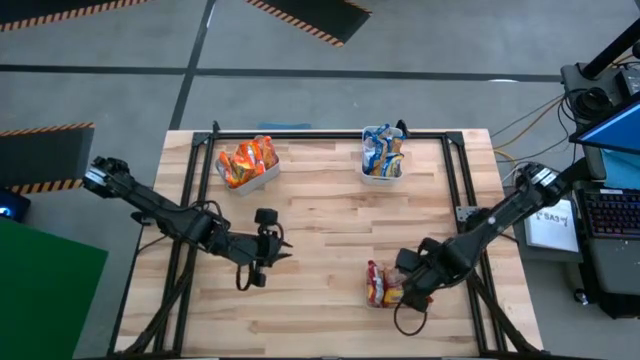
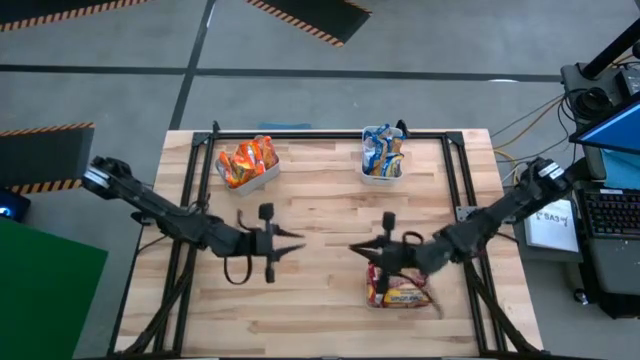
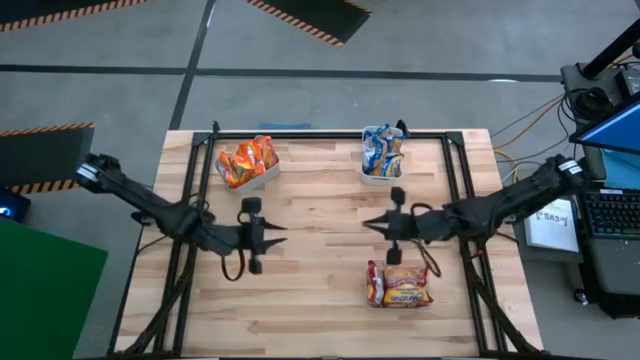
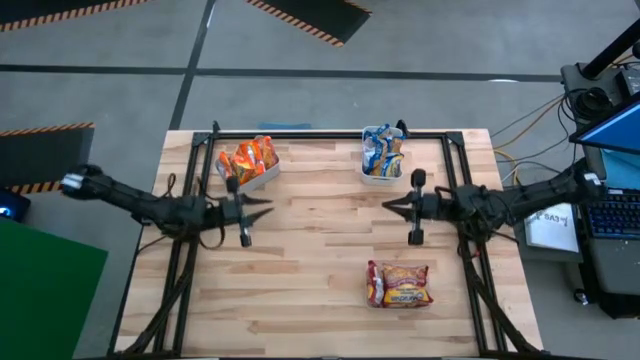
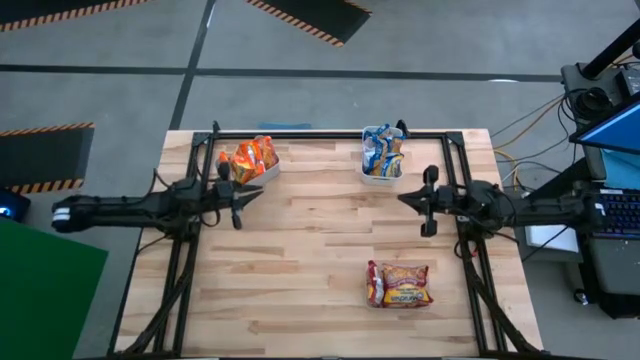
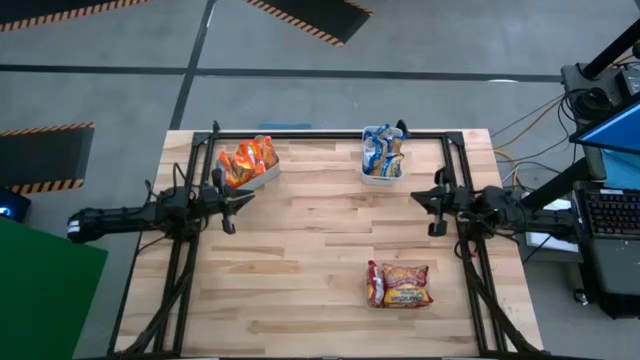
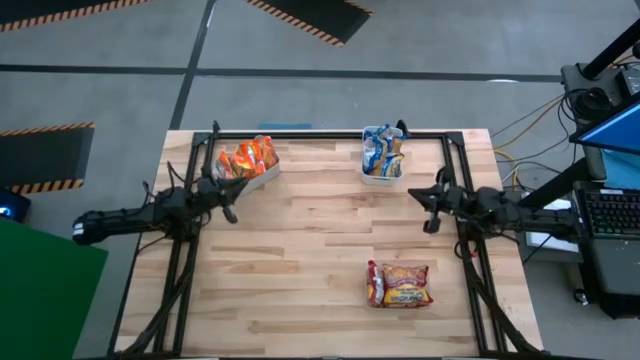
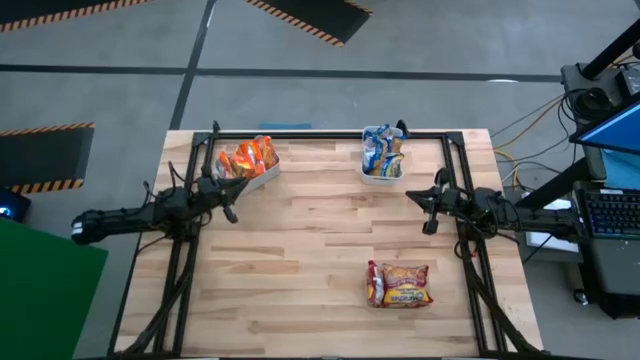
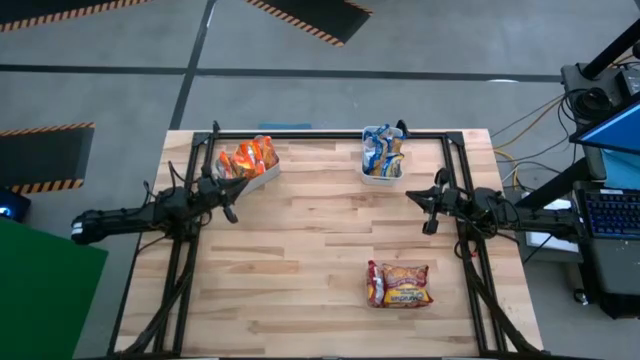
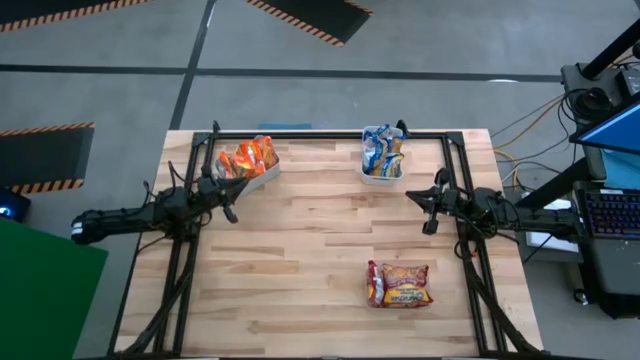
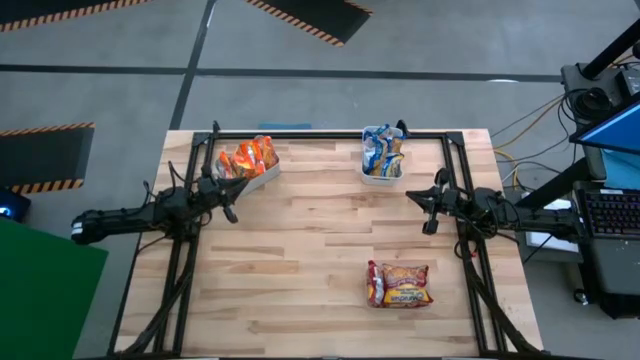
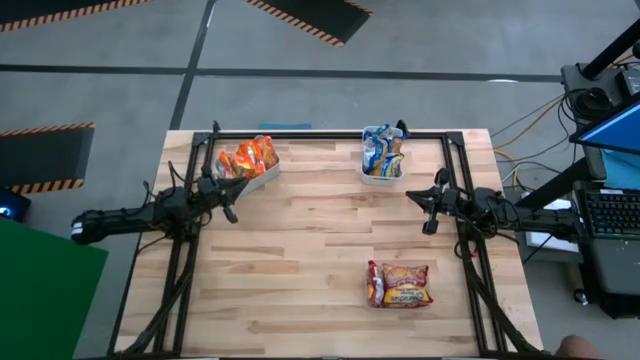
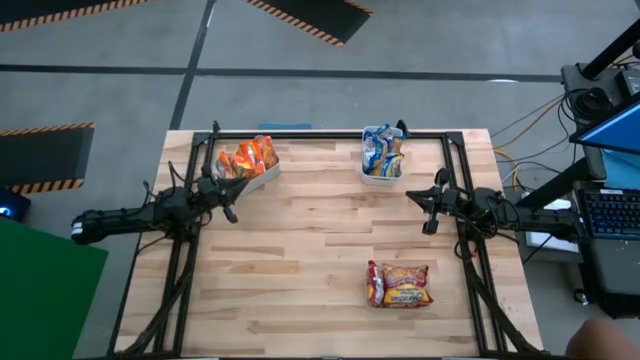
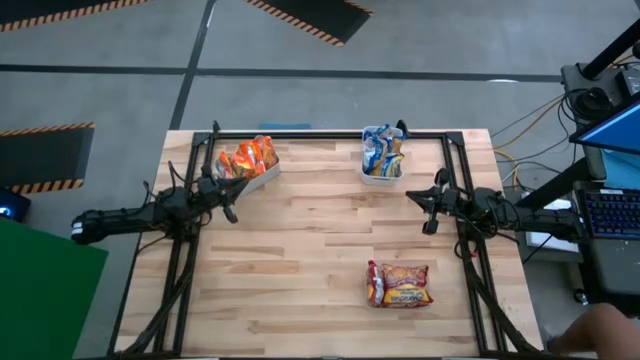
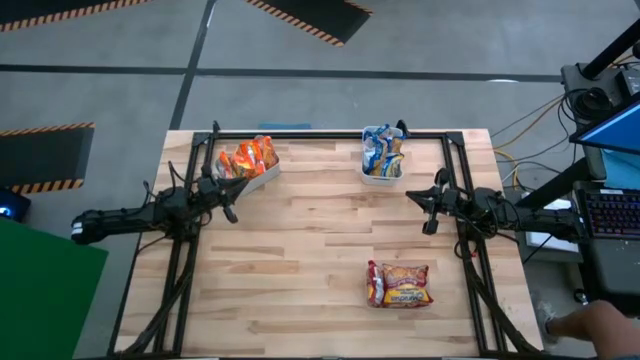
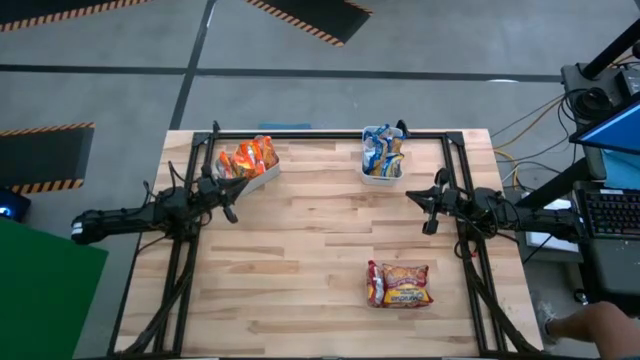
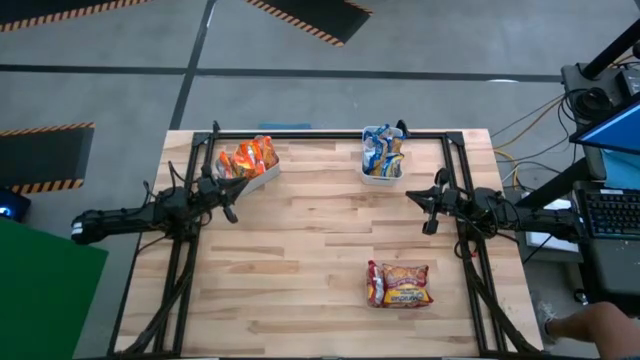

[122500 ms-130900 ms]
Task: Sort Maruchan noodles
Return to Home Position

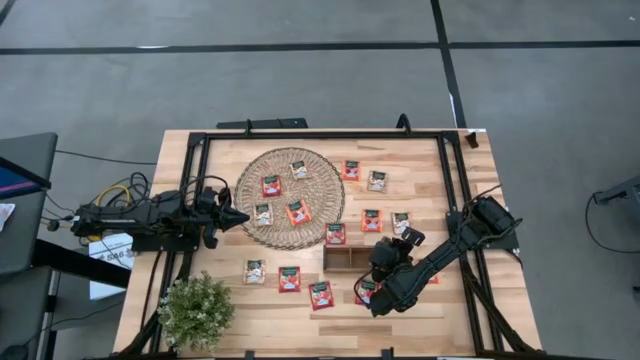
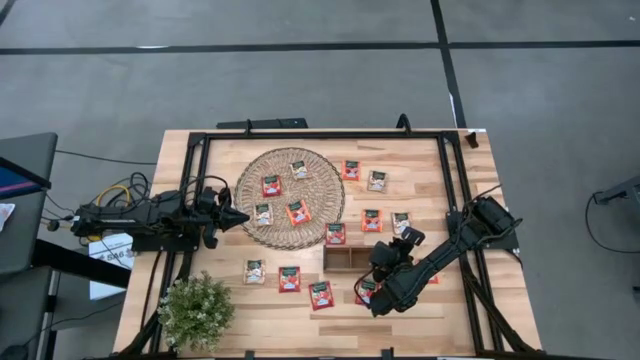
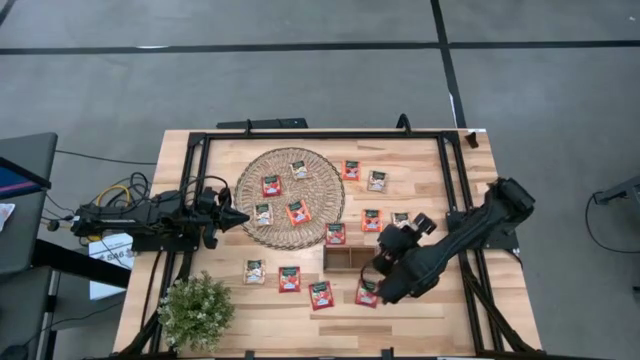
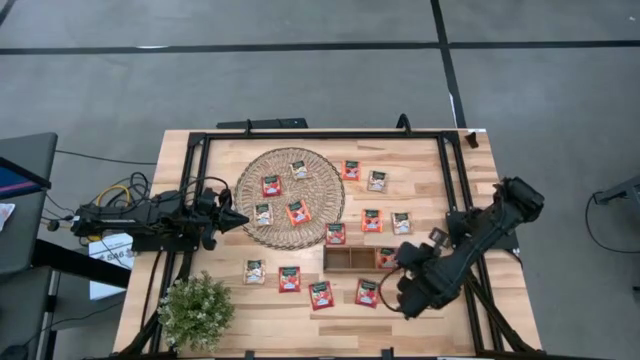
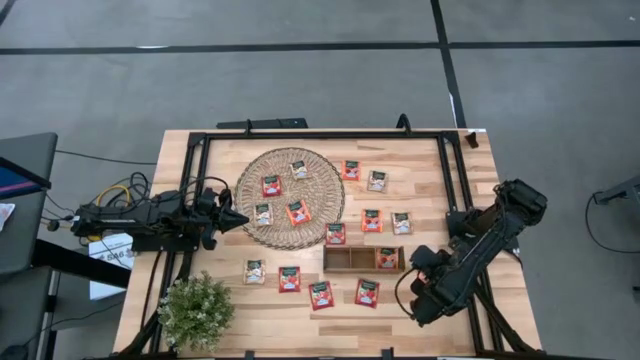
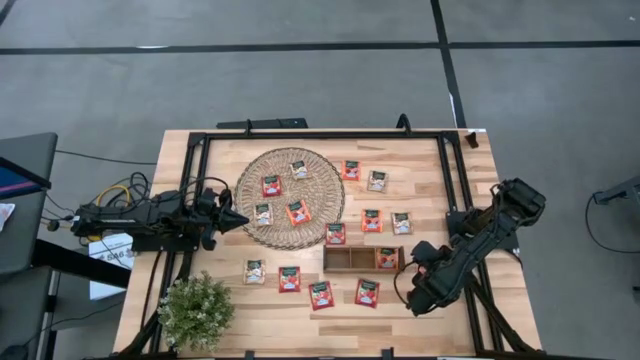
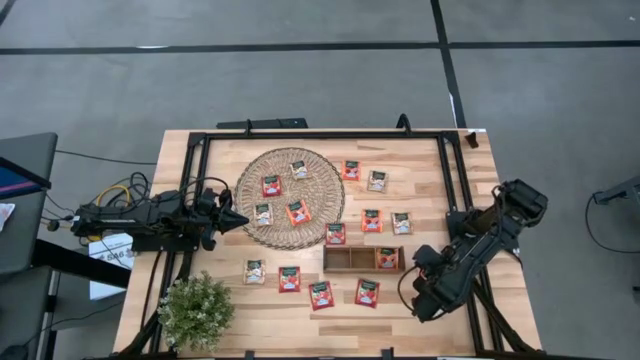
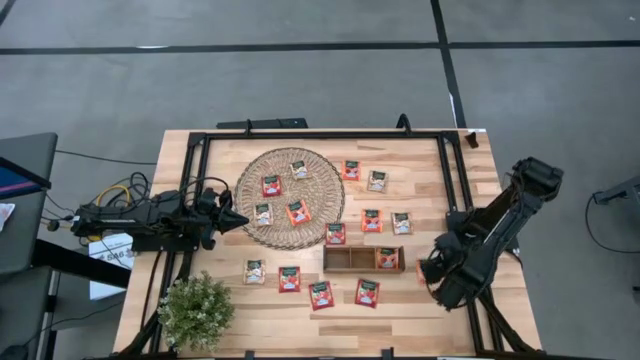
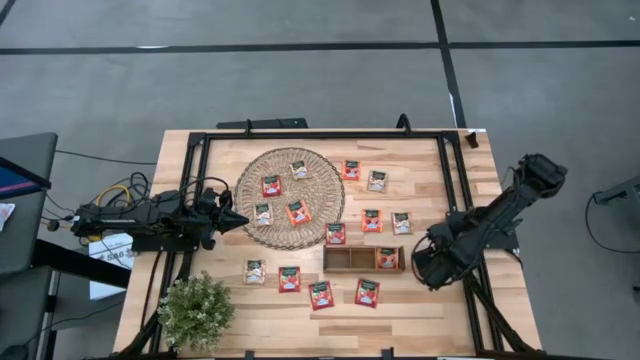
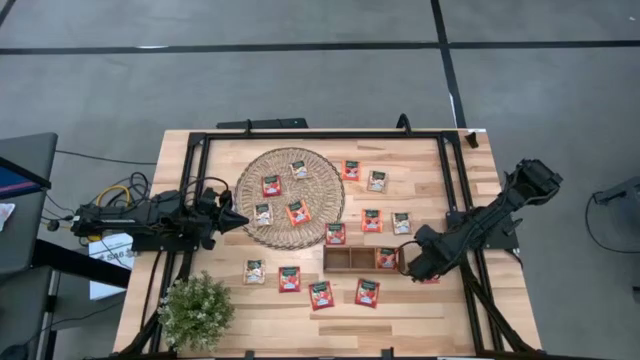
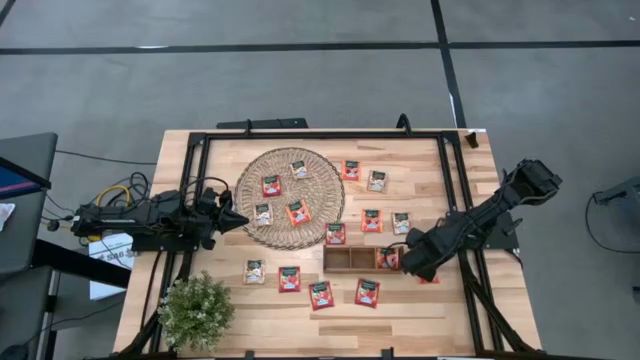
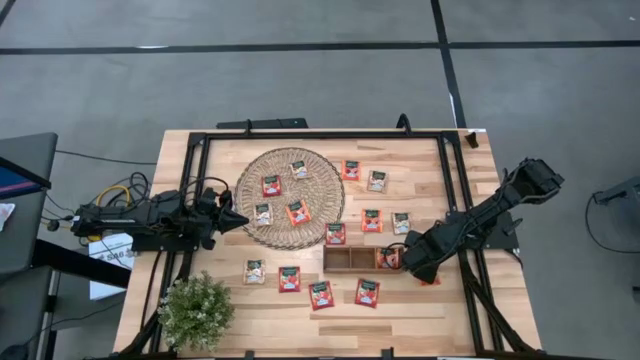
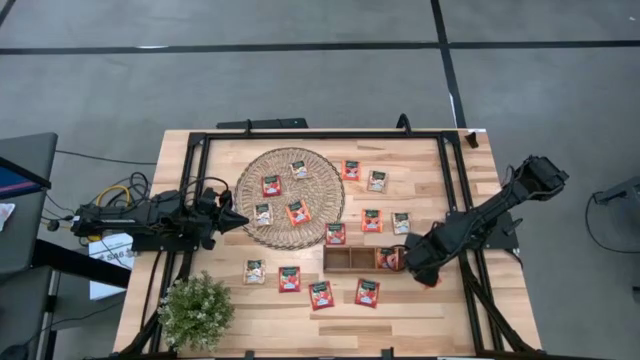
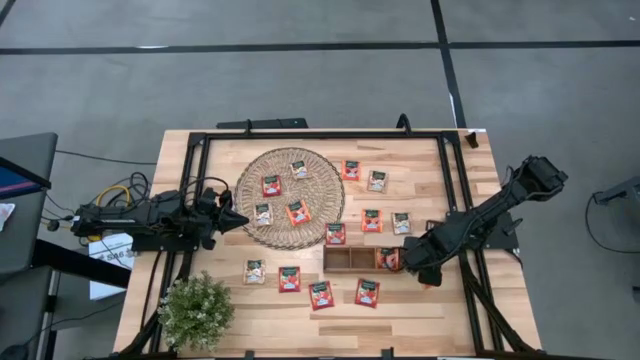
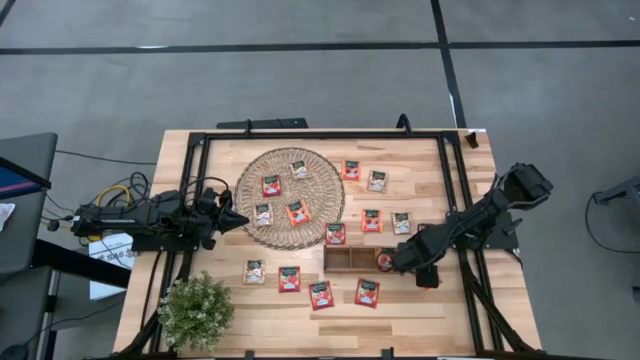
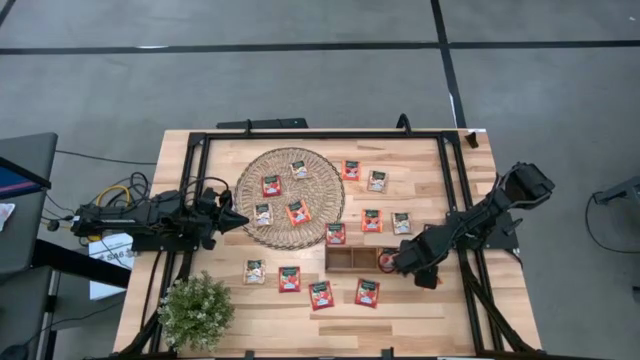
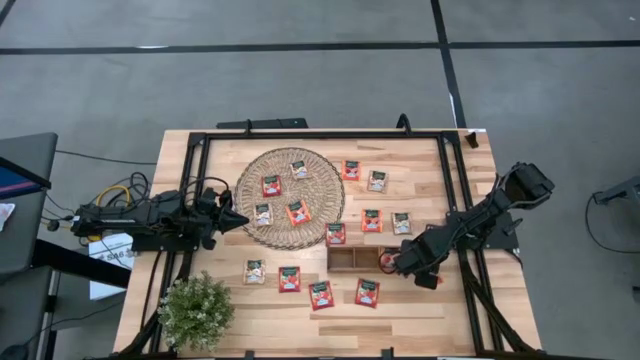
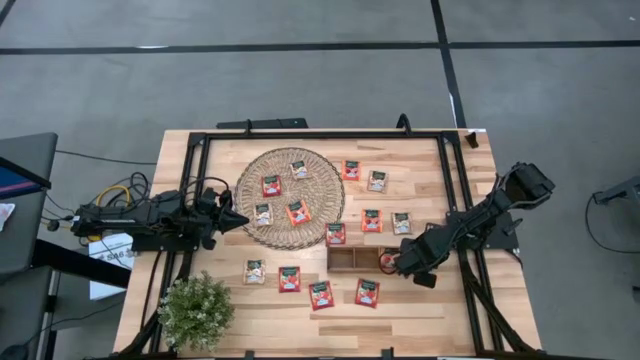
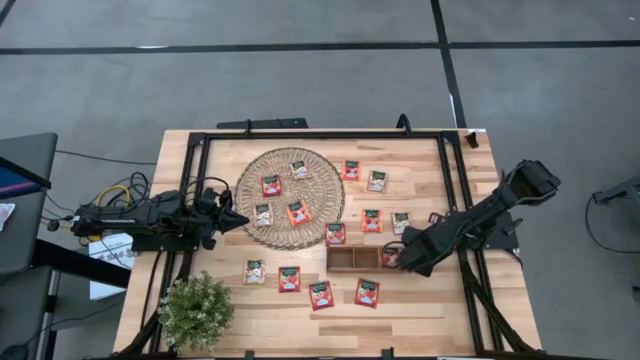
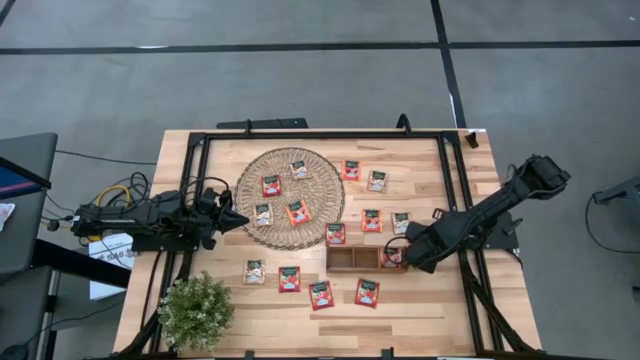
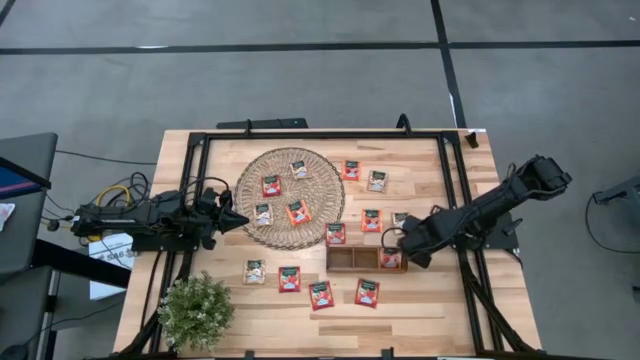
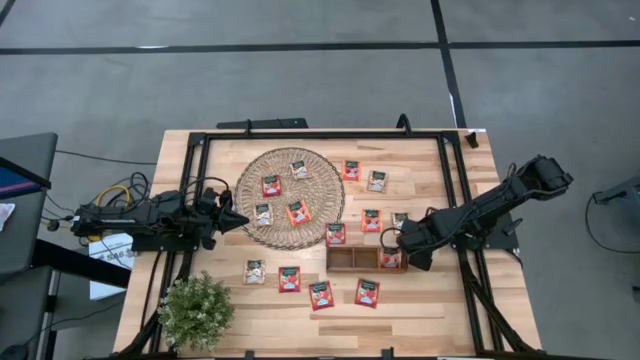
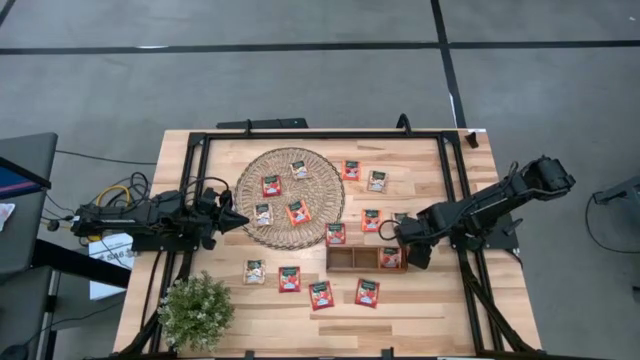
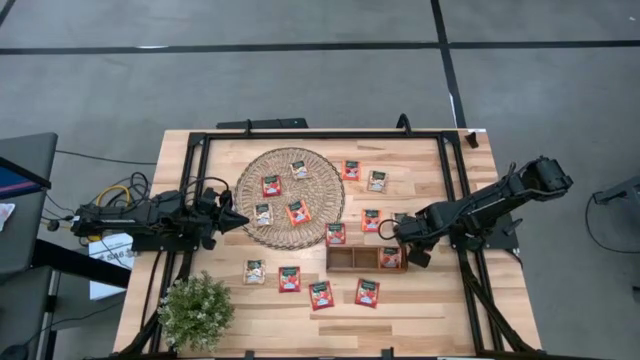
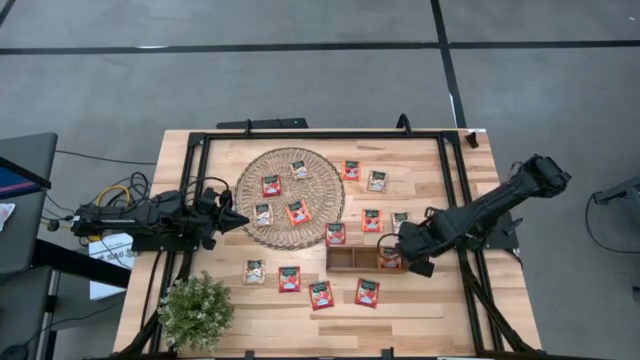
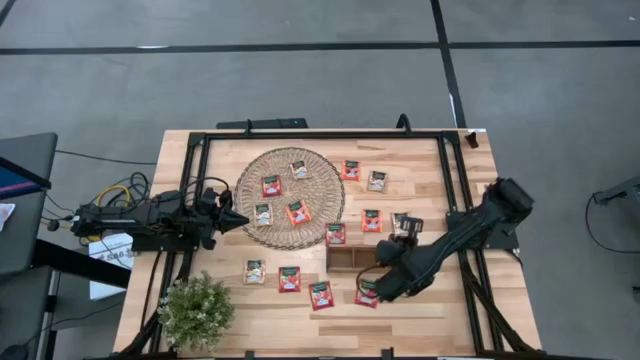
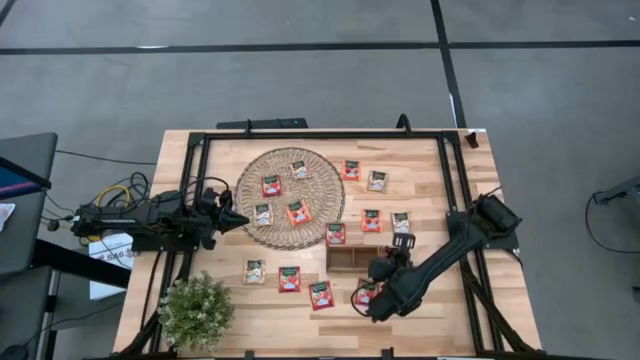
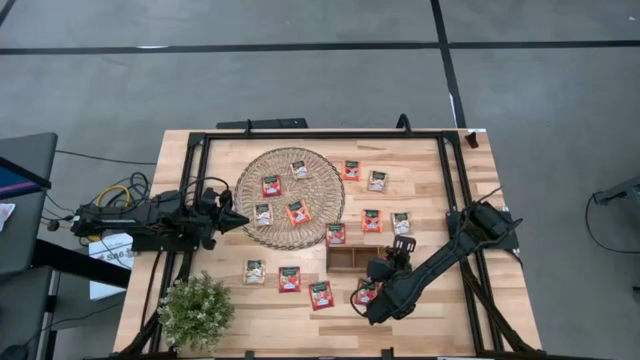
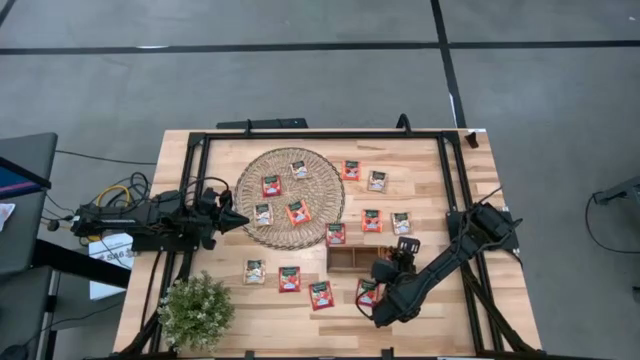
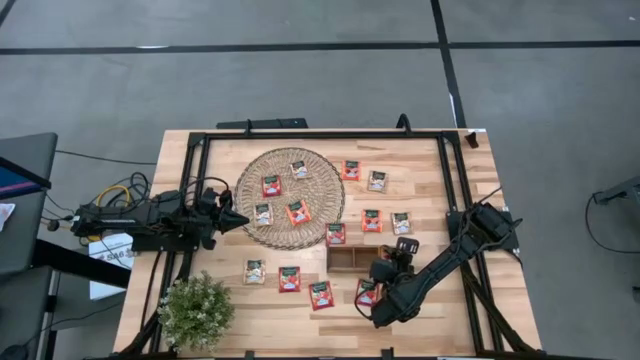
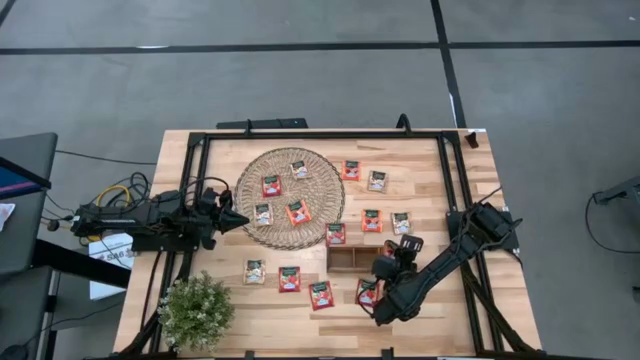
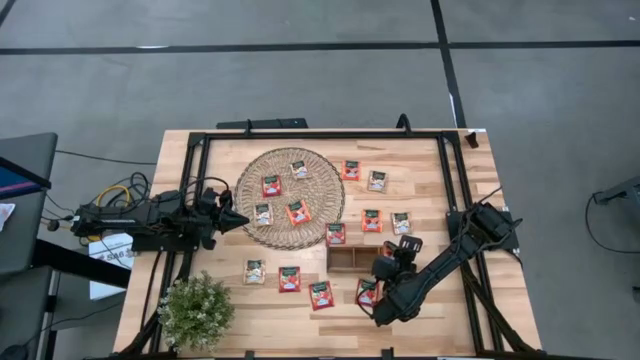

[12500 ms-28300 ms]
Task: Pick & Place Tea
Put the orange tea bag into the right section of the wooden organizer
